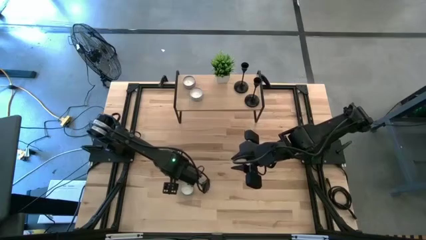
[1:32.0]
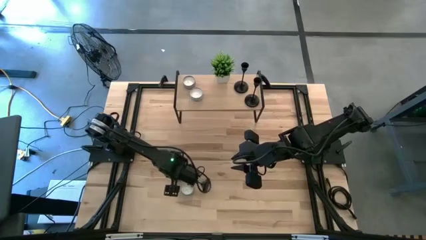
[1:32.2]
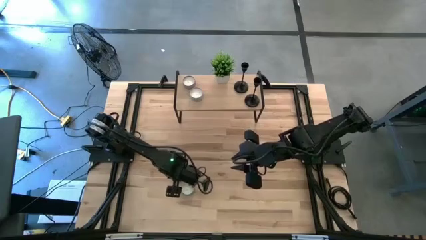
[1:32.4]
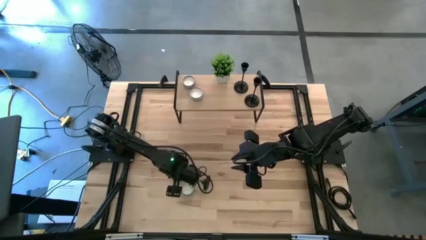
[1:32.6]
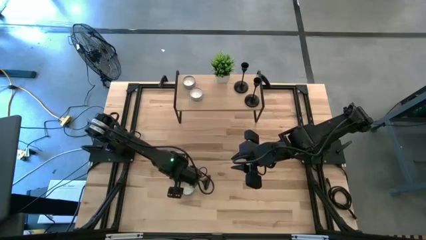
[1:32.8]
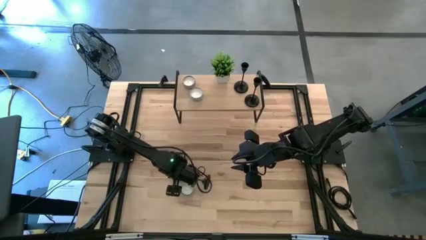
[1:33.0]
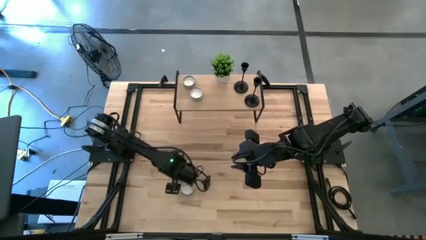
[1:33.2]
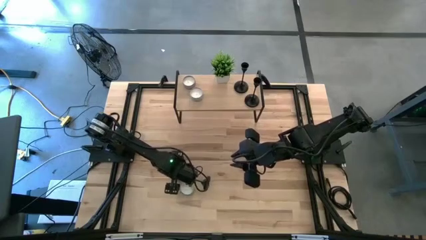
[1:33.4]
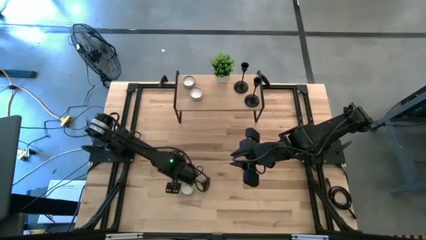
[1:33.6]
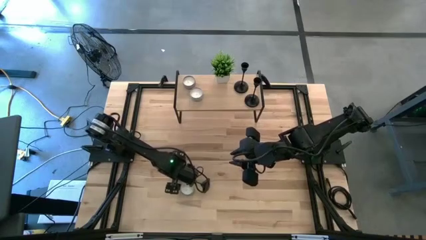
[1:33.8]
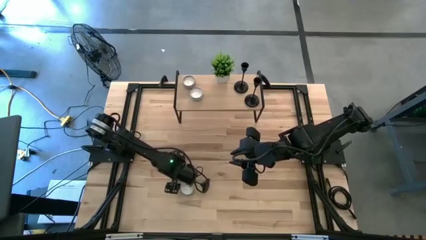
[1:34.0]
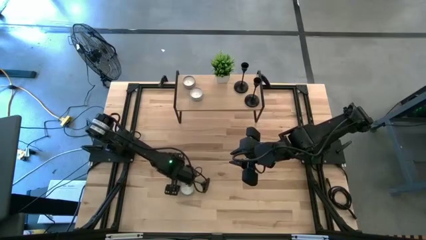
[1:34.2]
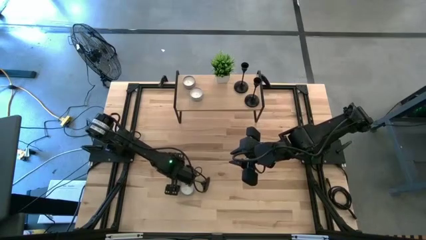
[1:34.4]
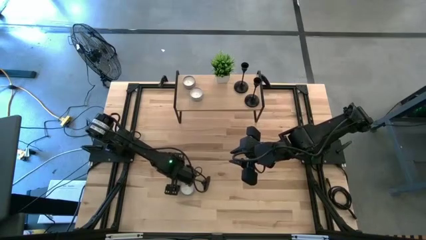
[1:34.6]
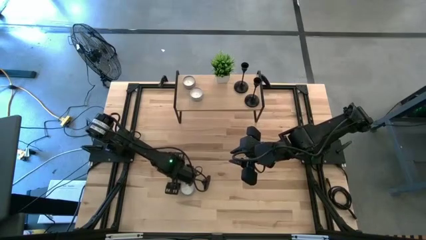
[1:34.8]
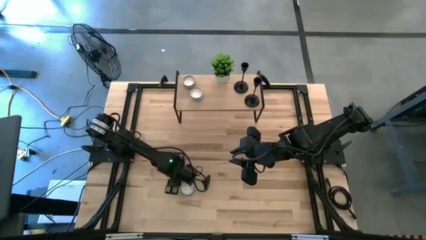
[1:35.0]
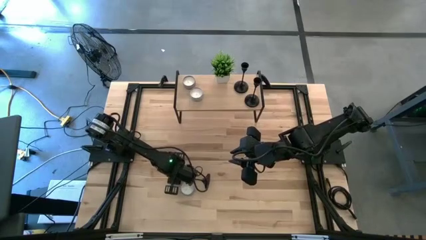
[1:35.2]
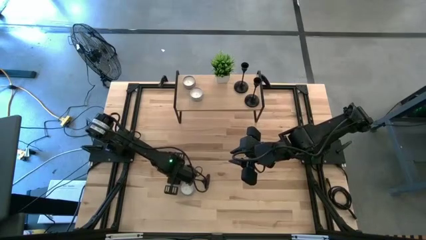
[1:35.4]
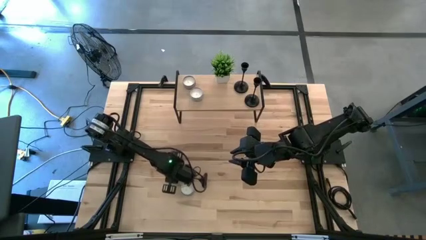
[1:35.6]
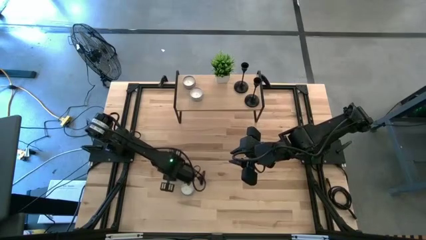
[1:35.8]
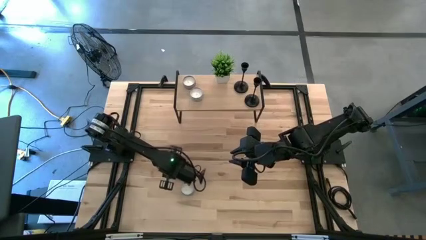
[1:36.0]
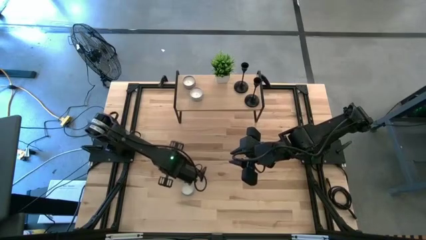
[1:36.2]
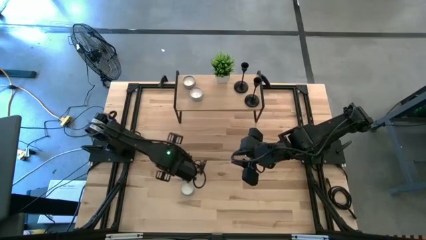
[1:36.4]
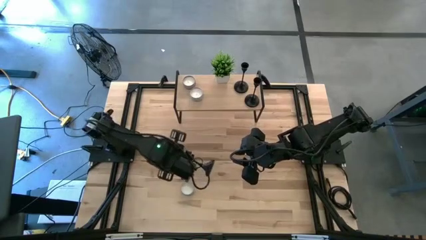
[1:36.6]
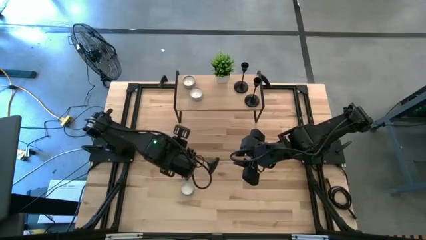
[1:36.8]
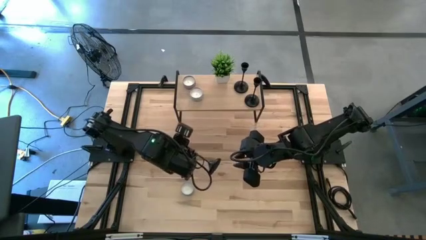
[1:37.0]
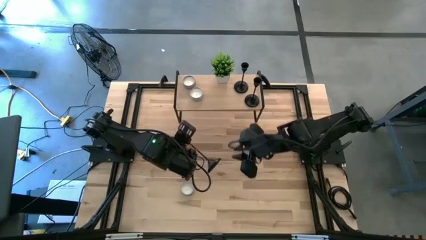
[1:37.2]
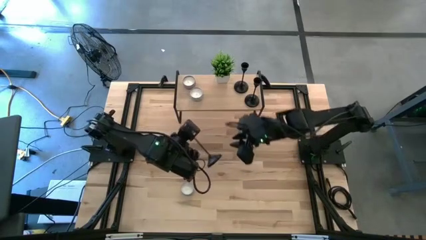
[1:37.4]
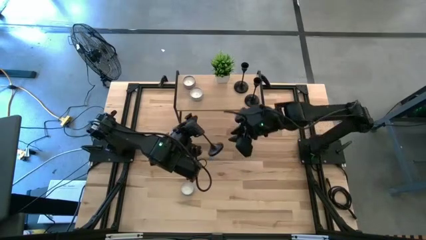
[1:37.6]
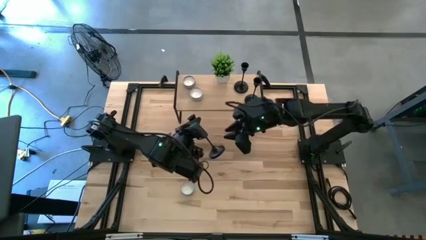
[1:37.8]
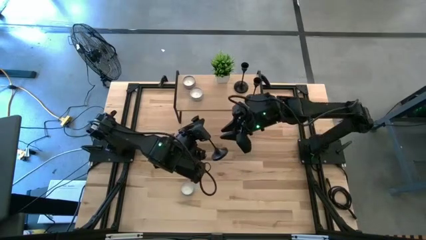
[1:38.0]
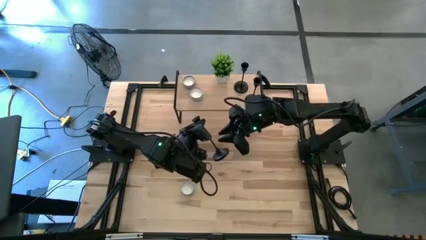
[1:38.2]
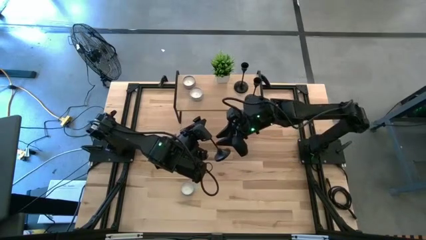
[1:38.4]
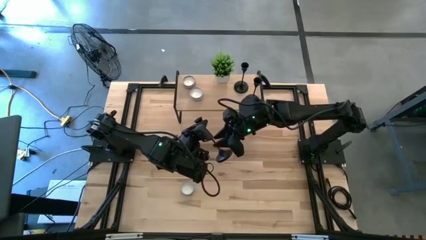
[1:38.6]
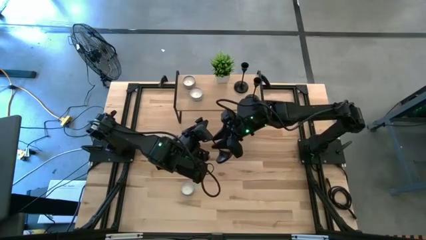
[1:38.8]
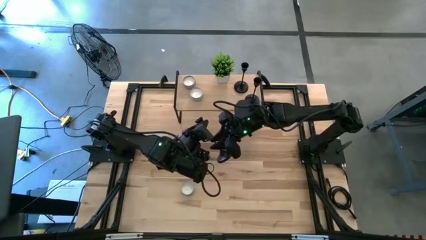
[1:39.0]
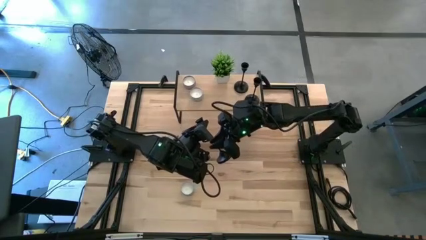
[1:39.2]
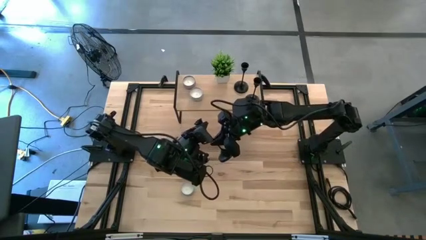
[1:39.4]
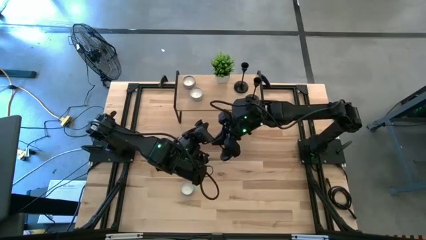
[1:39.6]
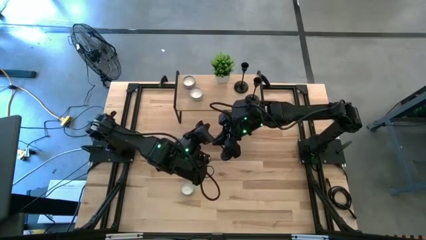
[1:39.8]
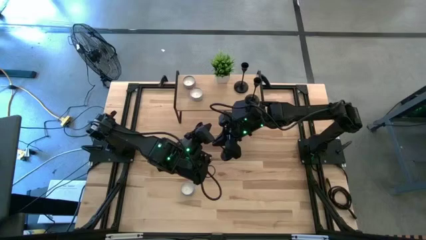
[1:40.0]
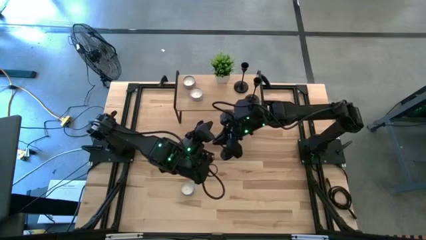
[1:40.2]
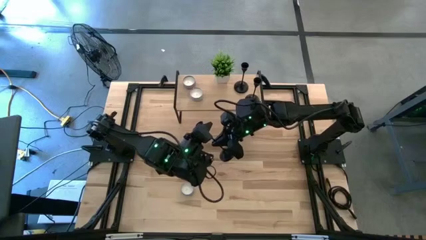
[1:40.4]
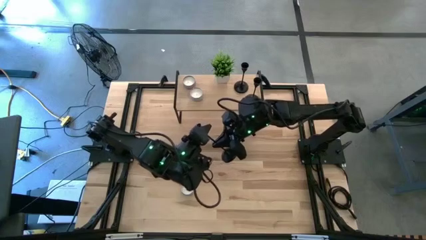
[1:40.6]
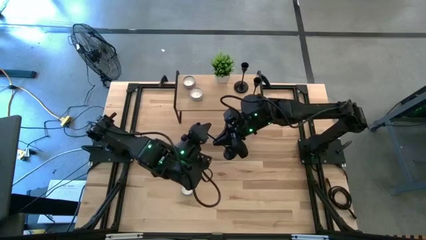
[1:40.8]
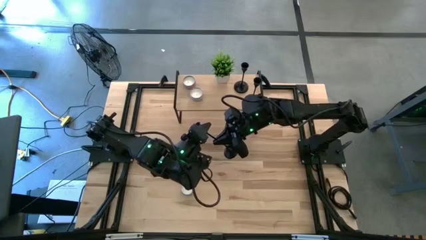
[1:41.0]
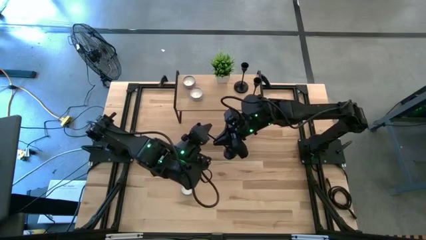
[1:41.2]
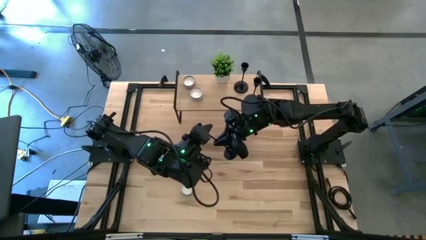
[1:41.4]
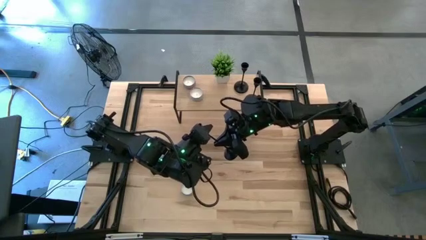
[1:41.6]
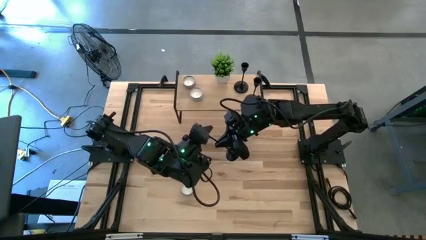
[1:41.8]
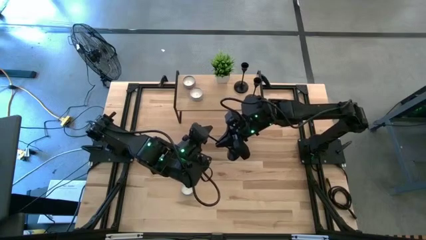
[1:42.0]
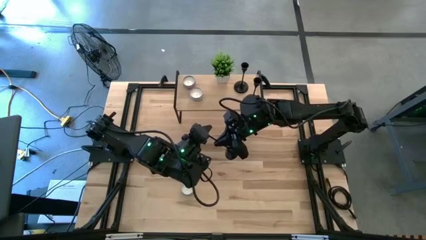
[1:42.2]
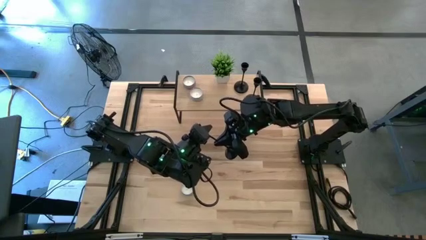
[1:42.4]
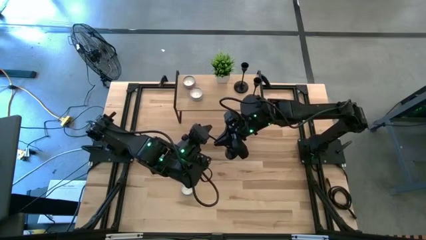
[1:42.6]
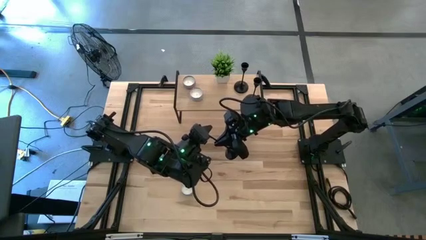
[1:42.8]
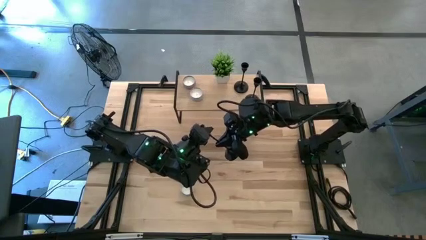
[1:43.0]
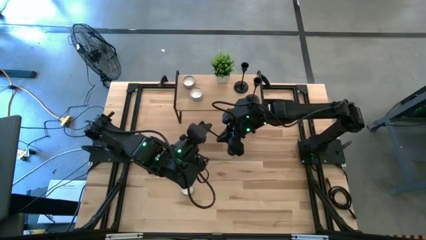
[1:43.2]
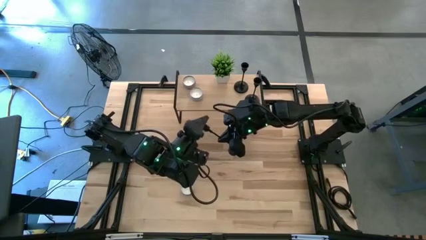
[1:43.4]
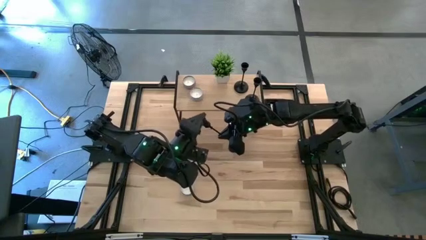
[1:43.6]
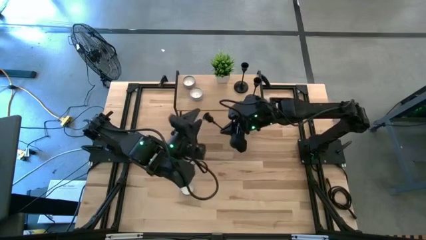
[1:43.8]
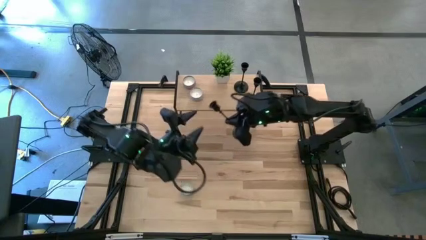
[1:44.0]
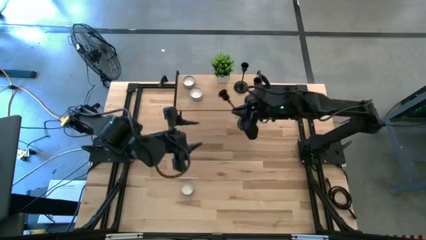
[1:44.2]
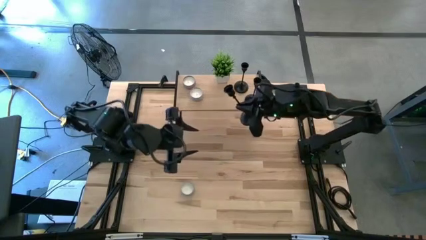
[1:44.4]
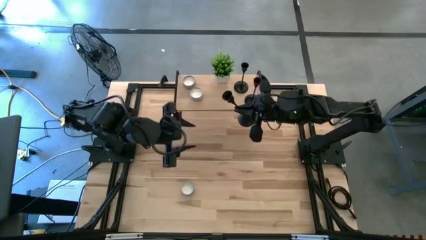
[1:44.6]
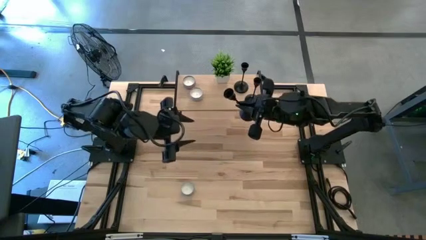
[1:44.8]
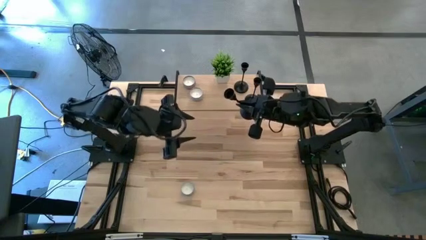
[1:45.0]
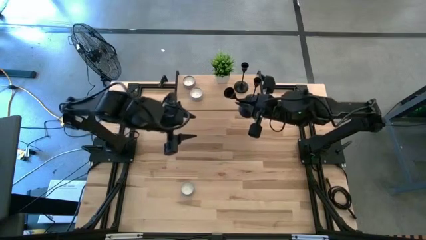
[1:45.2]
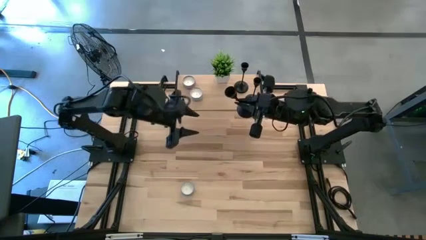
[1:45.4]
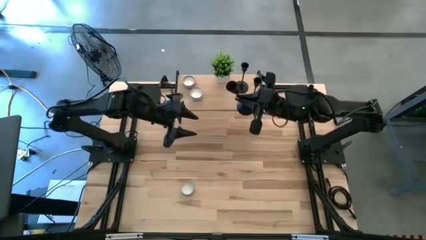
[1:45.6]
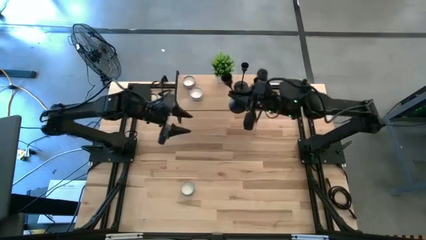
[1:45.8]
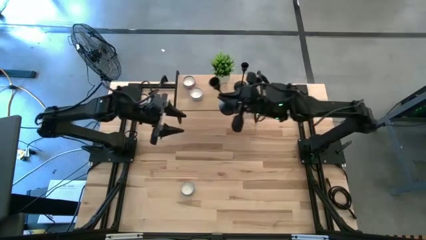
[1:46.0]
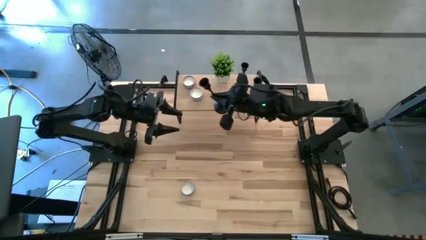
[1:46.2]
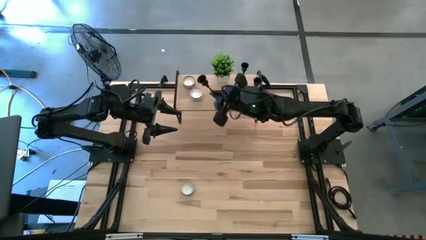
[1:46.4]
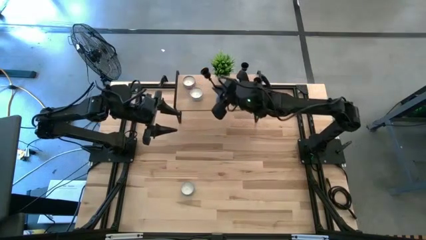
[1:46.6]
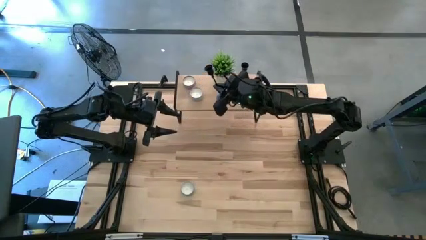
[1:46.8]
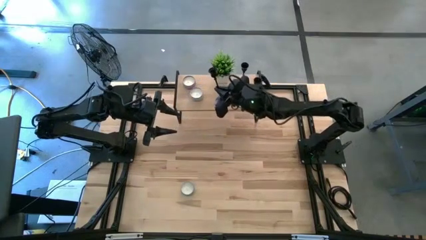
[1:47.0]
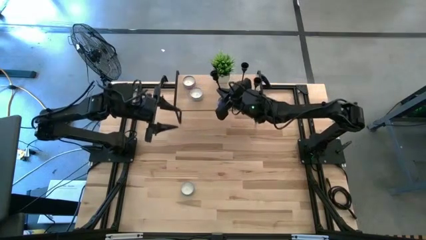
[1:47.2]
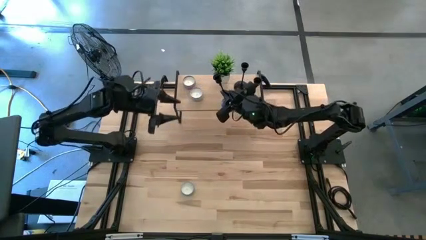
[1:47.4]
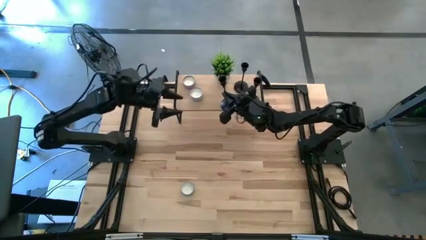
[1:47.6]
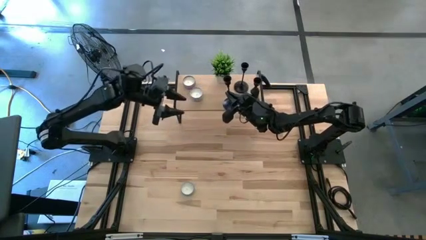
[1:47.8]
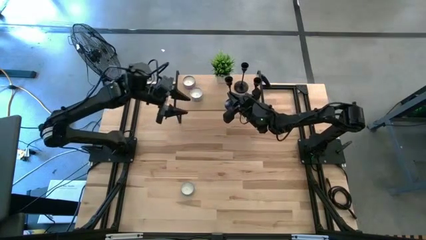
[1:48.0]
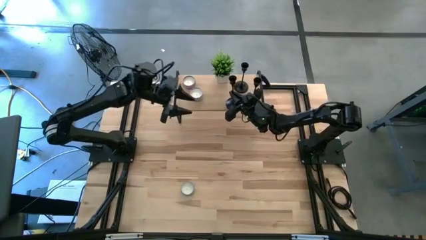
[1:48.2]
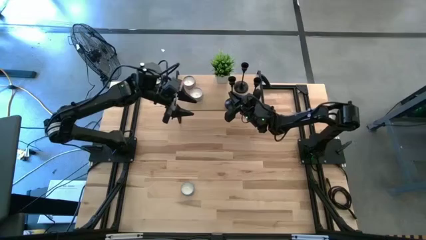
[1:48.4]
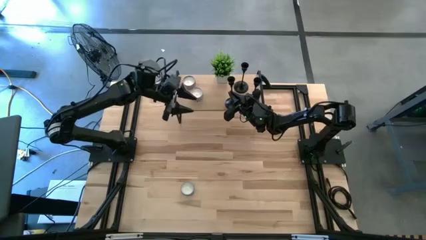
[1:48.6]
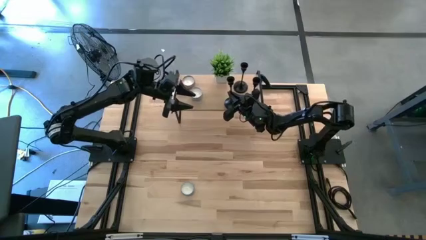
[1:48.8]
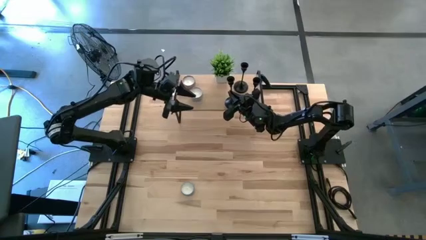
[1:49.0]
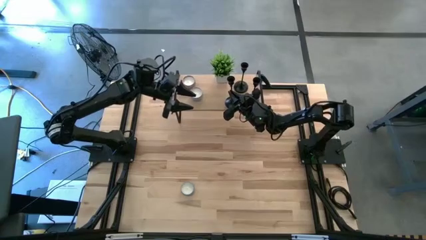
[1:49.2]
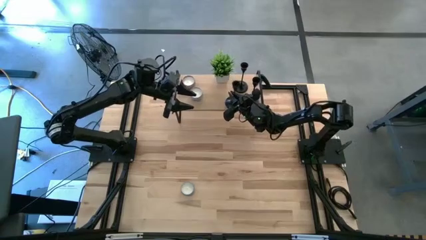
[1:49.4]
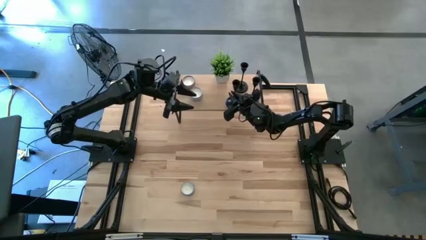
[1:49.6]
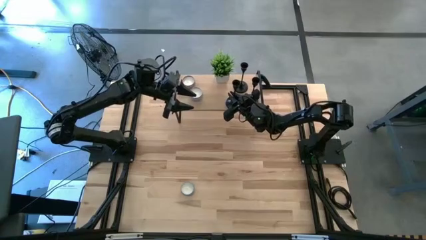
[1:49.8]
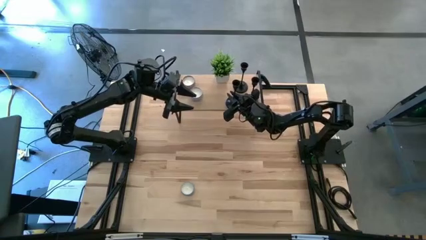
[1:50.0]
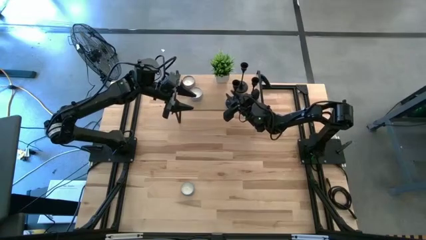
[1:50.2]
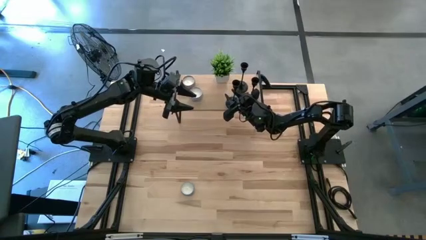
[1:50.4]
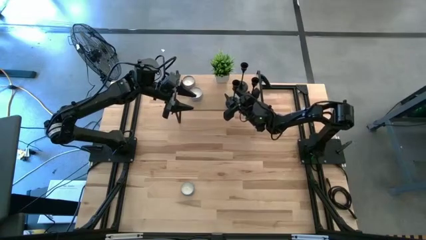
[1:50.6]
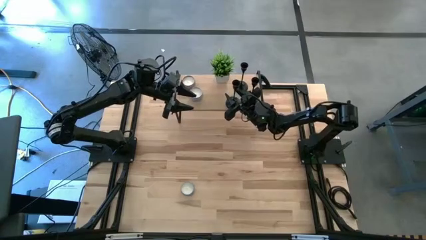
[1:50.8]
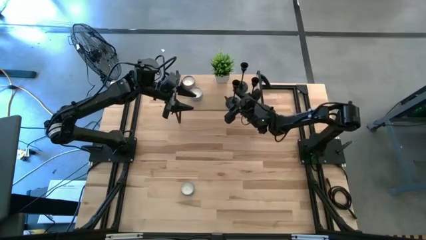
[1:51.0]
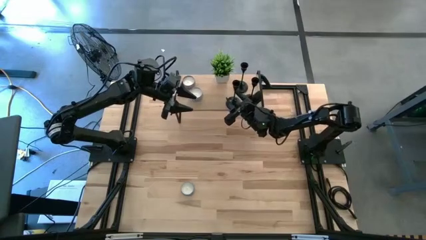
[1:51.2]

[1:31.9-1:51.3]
Task: Pick & Place candle stick holders
Put the black candle holder on the shelf
